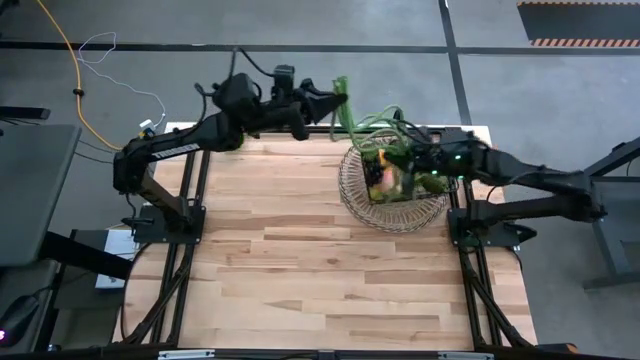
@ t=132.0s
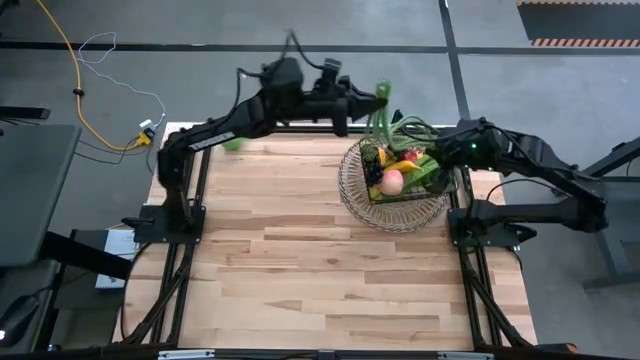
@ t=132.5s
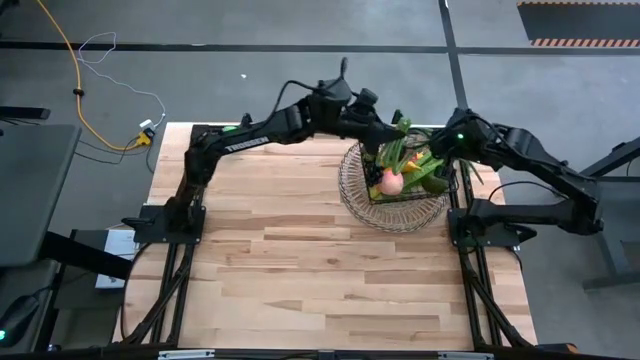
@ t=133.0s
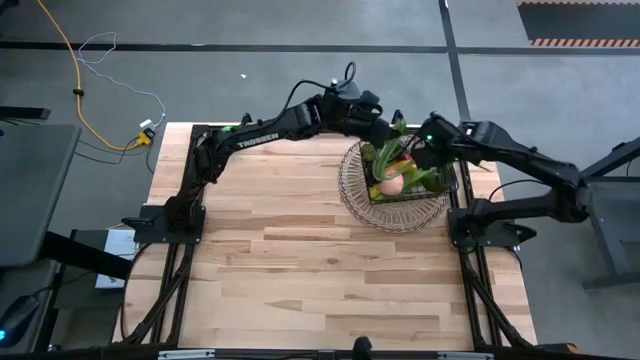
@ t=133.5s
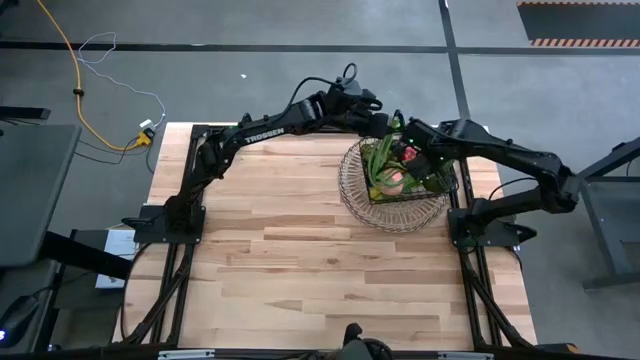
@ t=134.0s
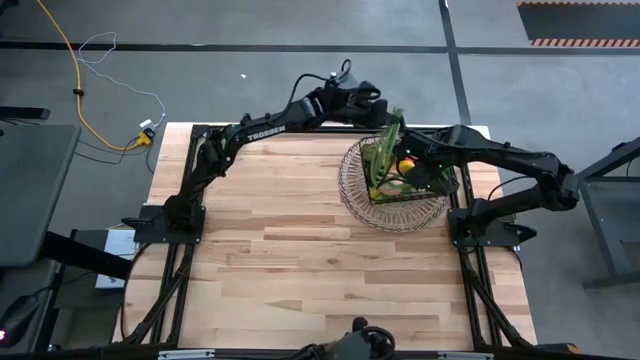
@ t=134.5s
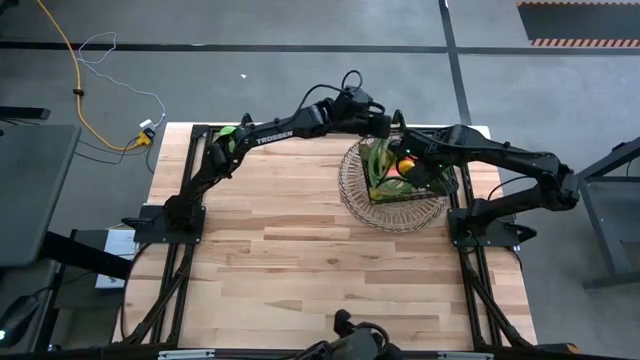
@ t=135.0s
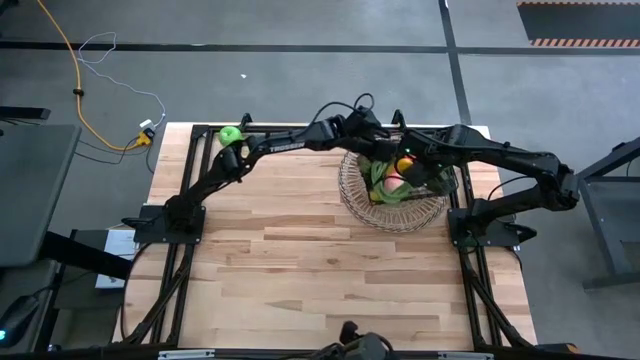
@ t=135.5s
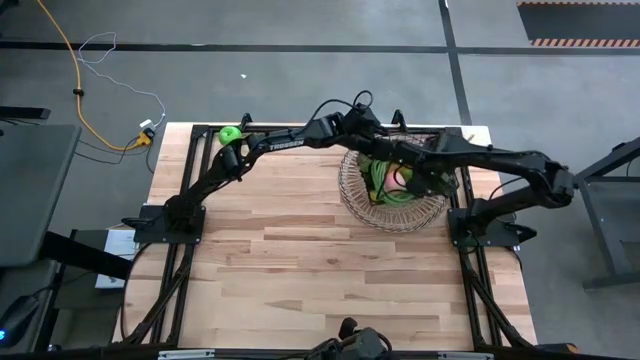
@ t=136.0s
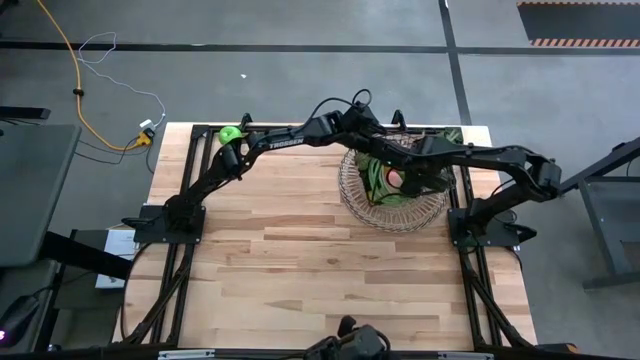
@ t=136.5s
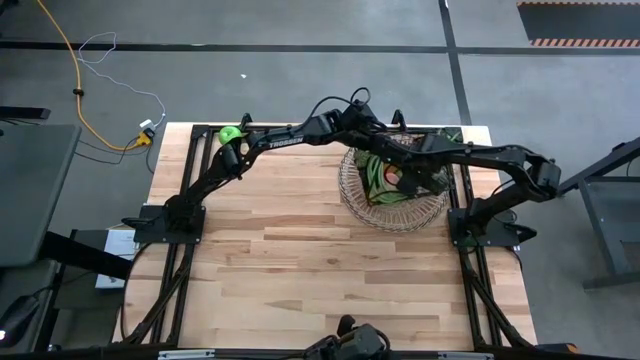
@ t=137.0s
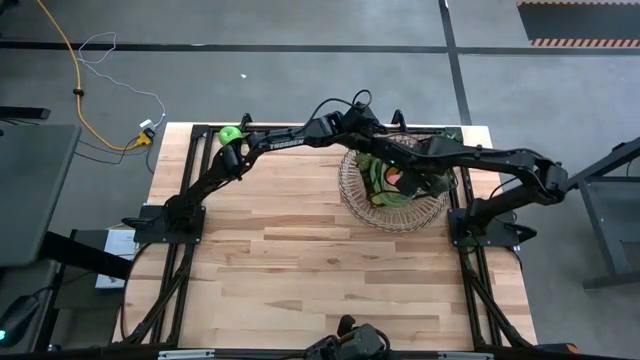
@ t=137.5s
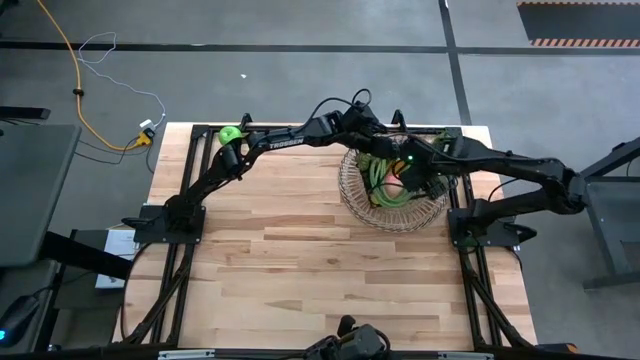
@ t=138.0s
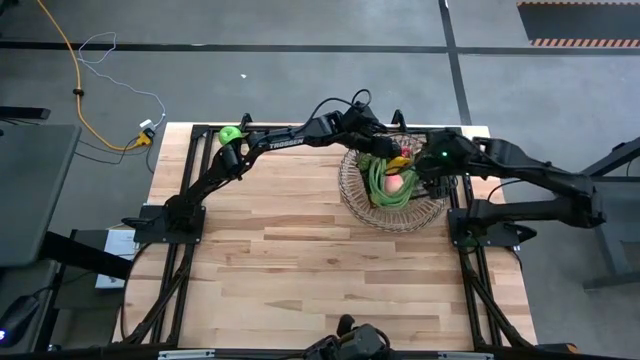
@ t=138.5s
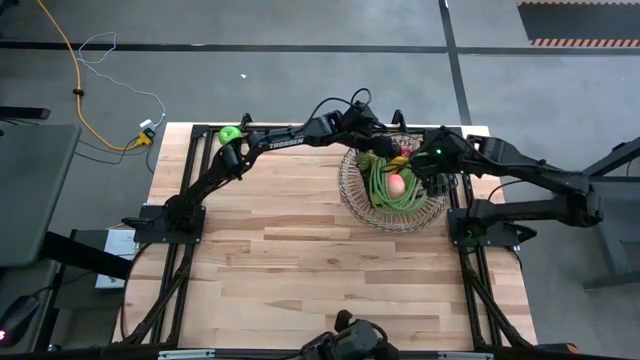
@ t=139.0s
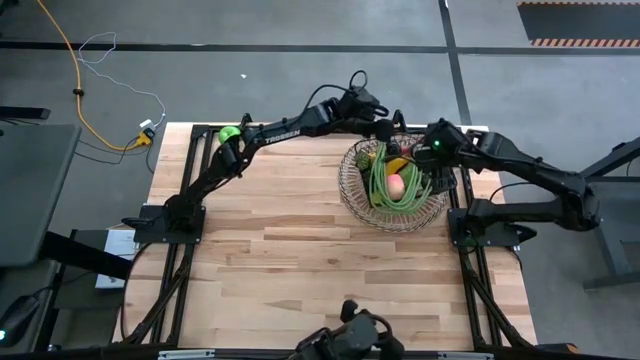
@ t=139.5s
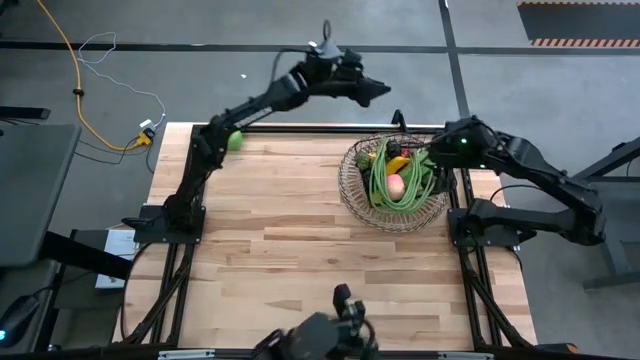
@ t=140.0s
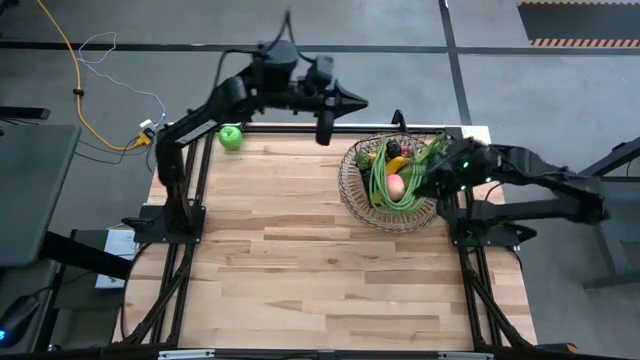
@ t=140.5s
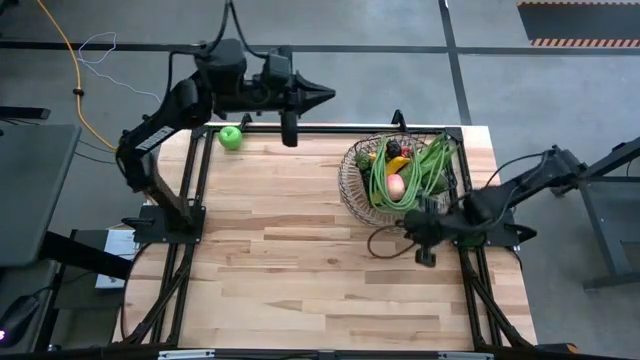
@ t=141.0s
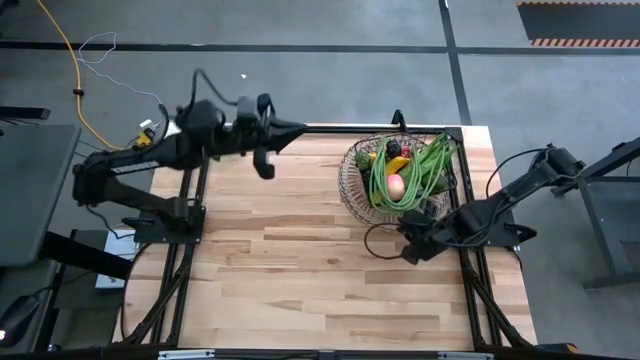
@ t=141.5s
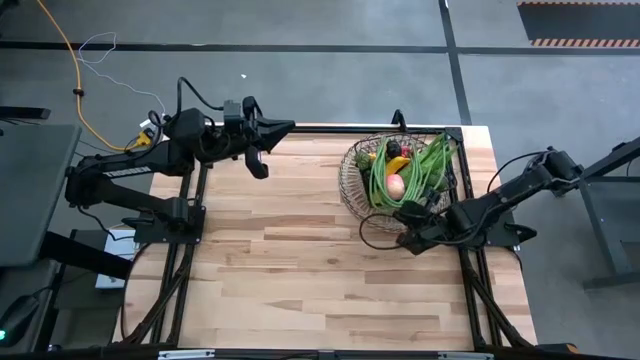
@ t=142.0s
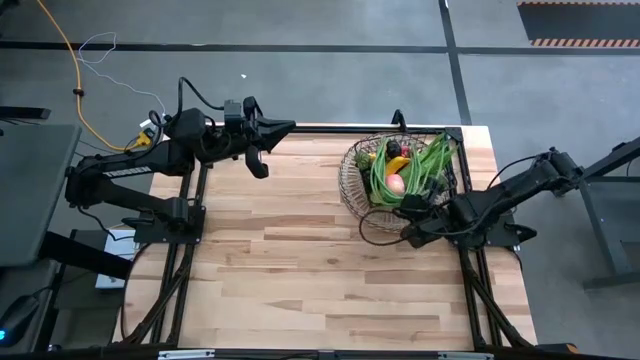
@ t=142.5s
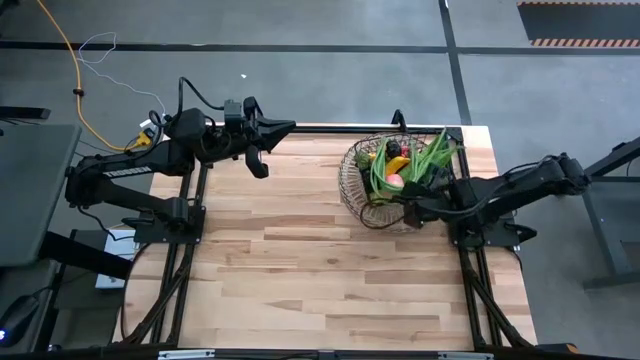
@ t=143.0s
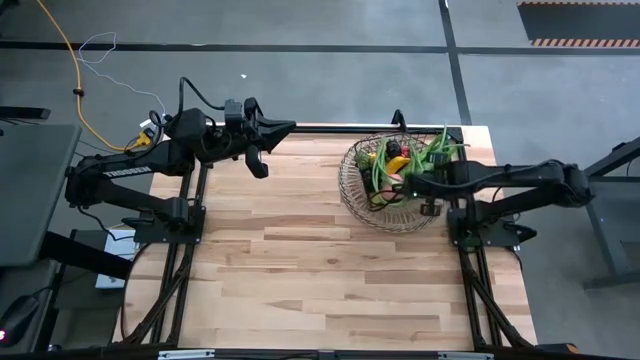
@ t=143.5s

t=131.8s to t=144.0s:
Task: Build produce basket
Put the green string beans into the wire basket

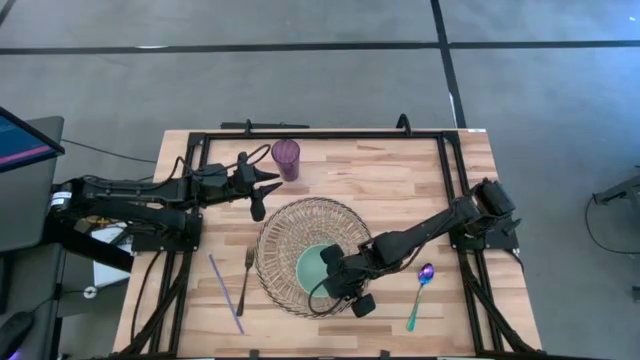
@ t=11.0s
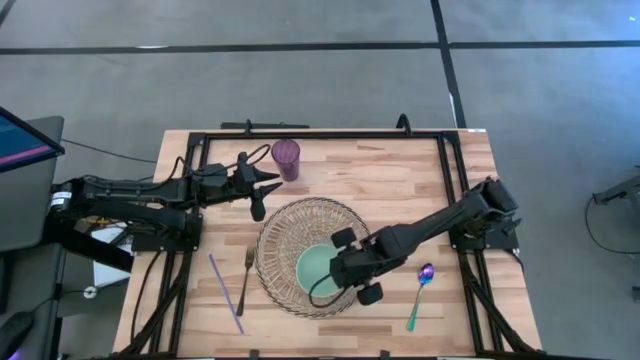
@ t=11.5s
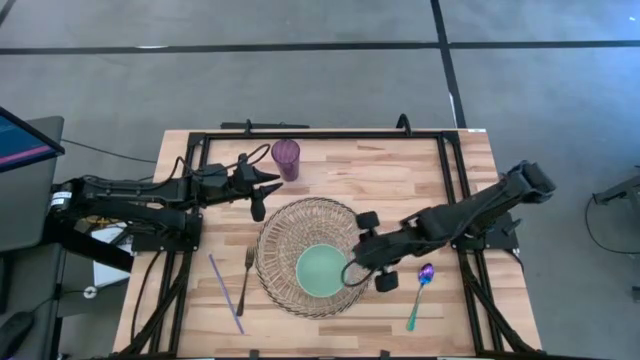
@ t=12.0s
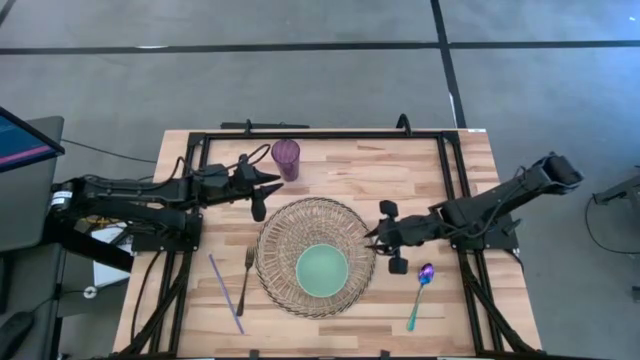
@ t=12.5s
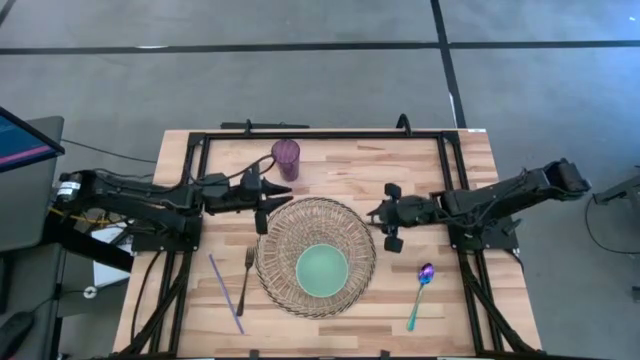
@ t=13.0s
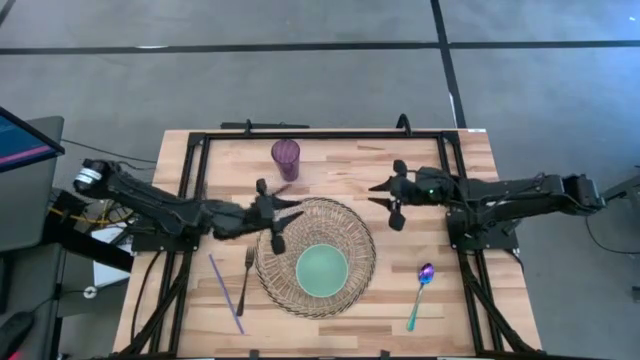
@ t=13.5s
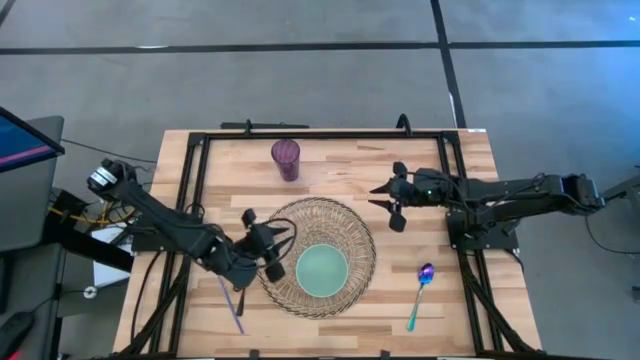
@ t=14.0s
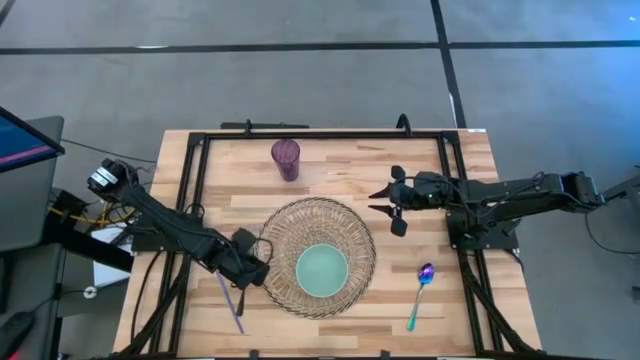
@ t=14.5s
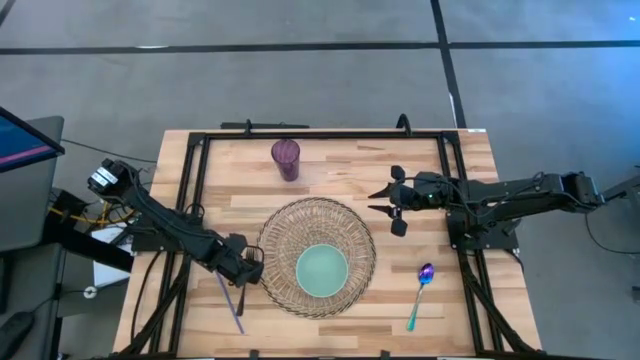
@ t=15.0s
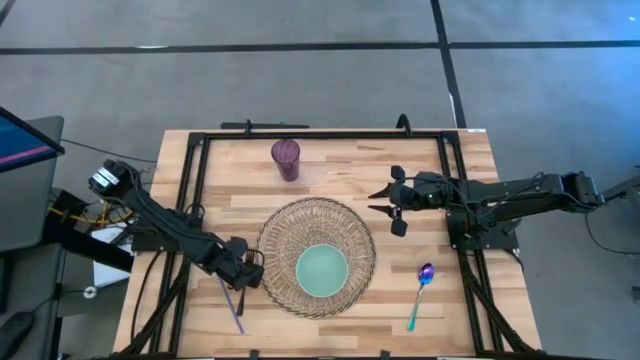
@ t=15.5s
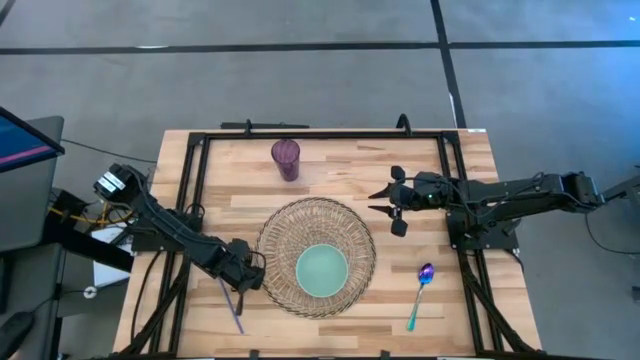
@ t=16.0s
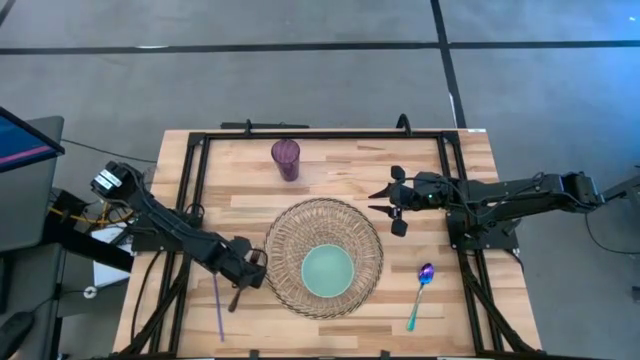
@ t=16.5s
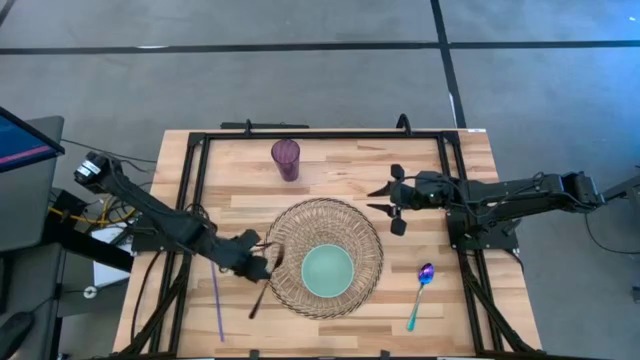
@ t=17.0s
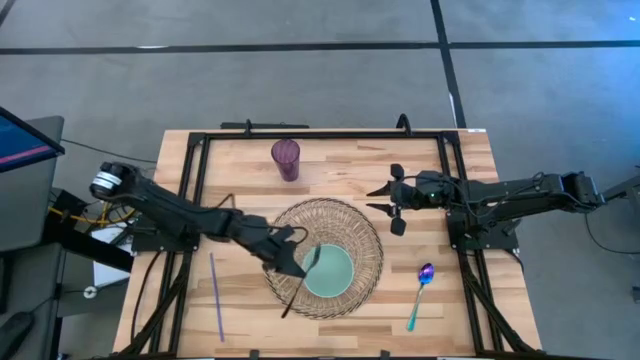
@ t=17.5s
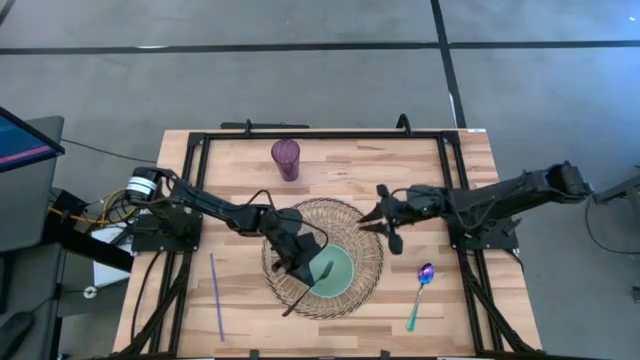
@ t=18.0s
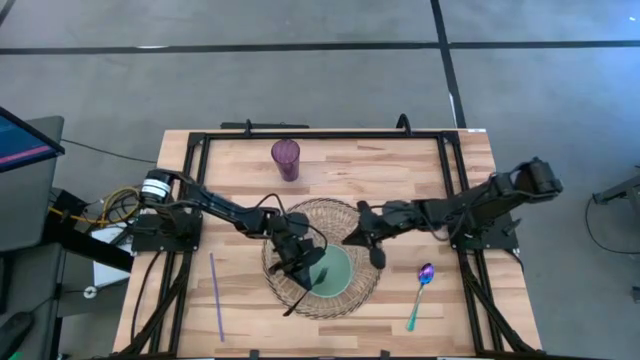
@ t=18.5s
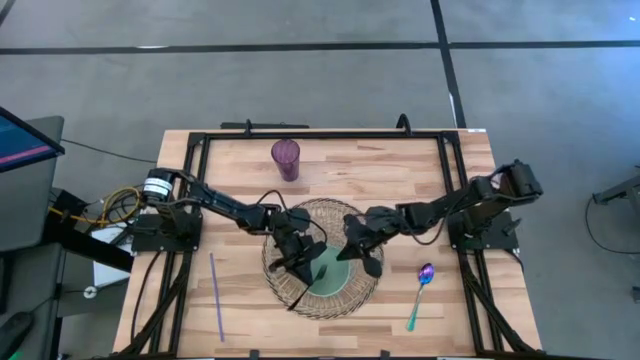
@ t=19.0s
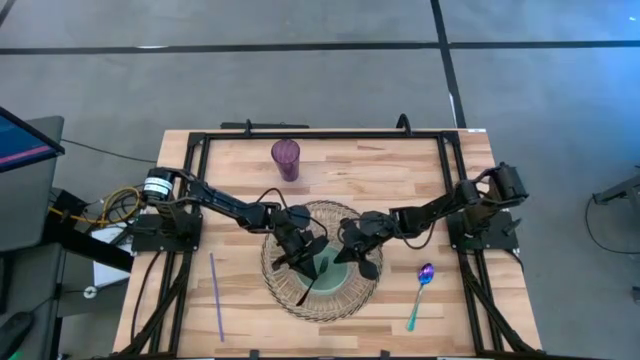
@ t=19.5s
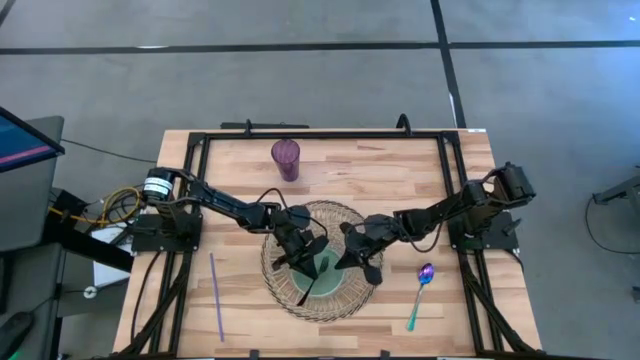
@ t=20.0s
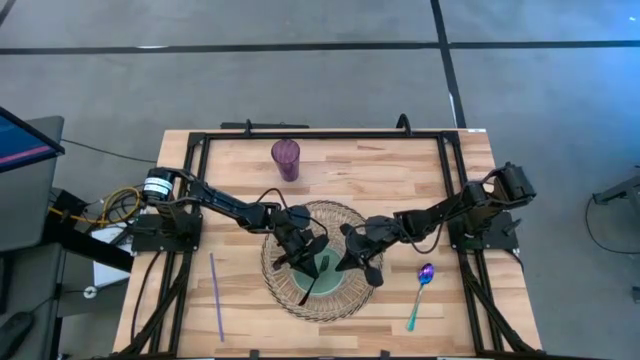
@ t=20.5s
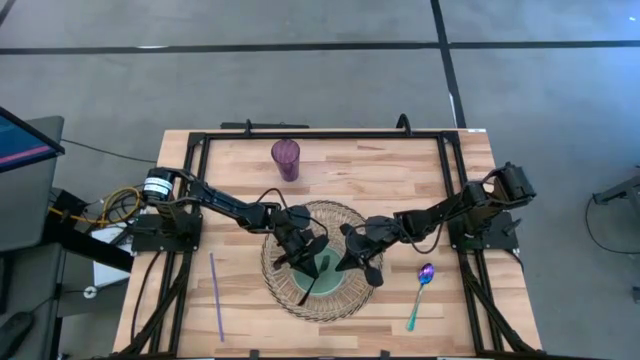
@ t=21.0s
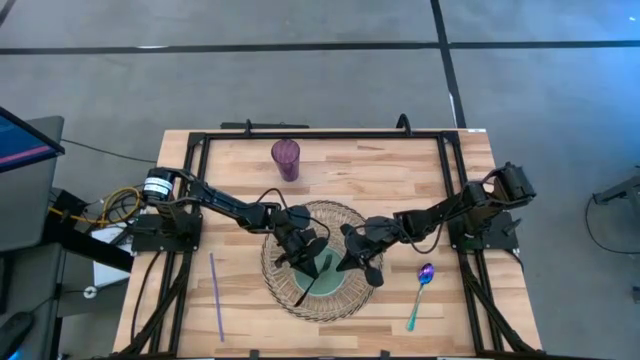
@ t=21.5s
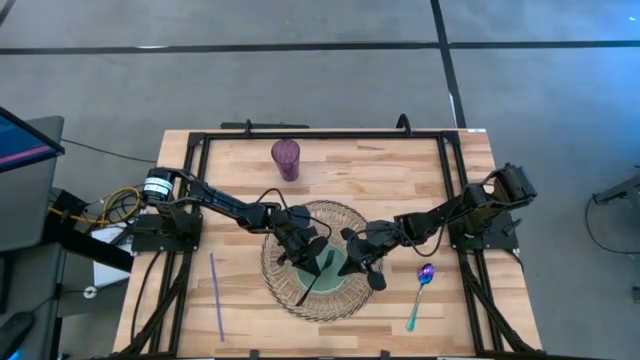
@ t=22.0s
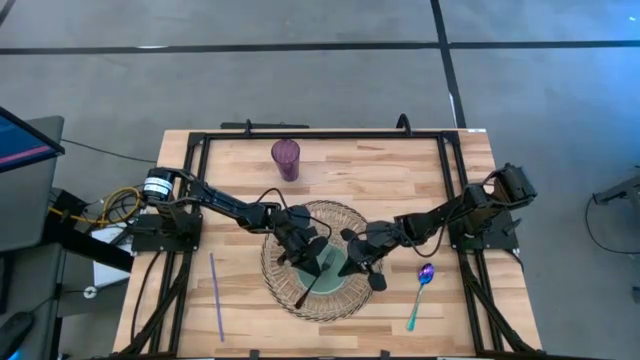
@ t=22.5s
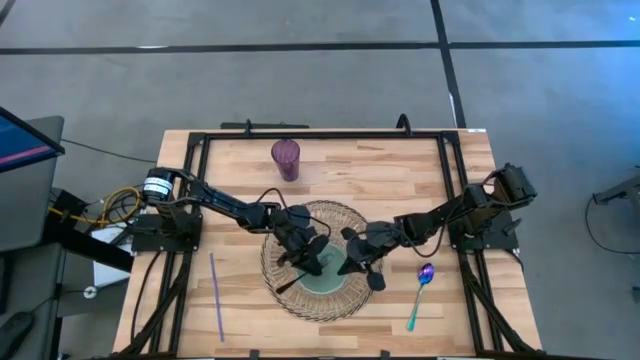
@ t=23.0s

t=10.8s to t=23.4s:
Task: Pick & Place Utensil
Put the black fork into the light green bowl on the woven mat
